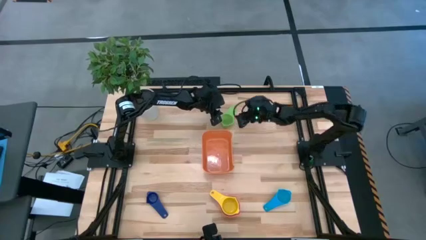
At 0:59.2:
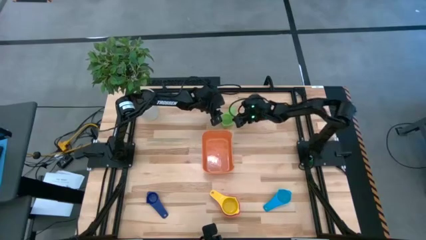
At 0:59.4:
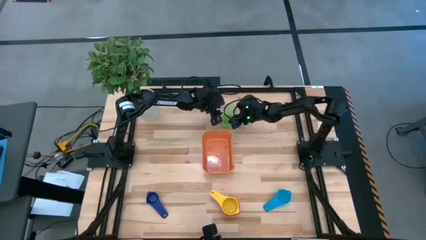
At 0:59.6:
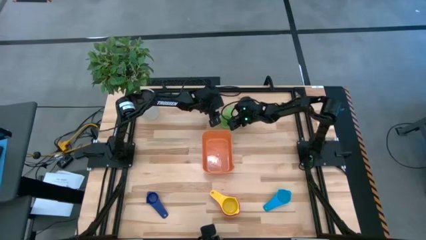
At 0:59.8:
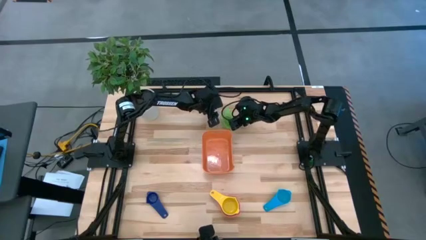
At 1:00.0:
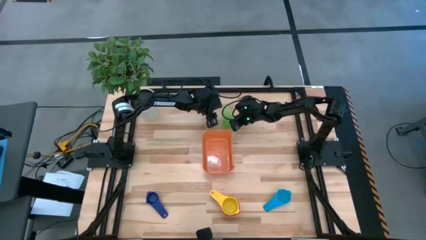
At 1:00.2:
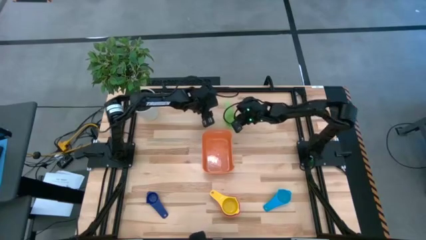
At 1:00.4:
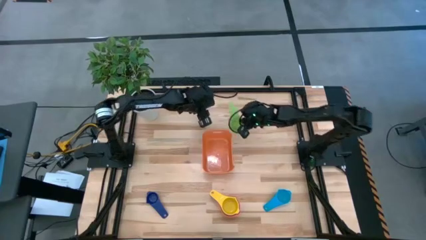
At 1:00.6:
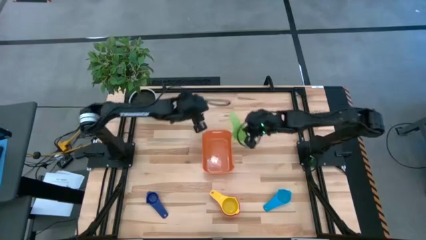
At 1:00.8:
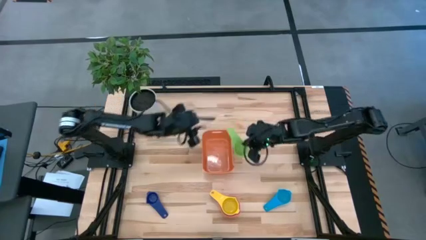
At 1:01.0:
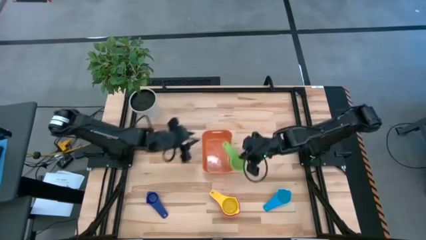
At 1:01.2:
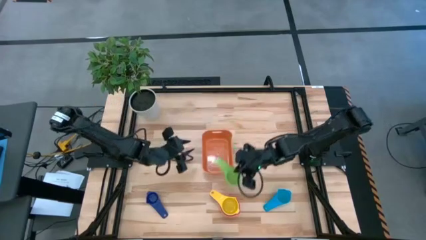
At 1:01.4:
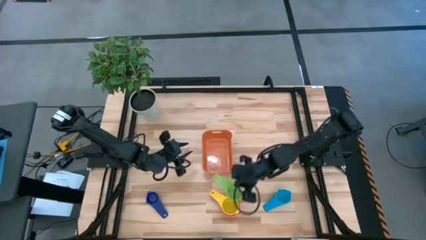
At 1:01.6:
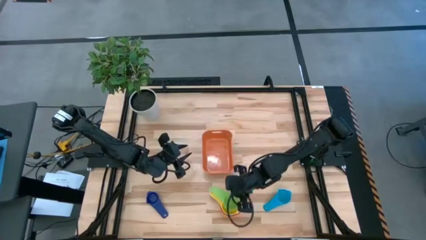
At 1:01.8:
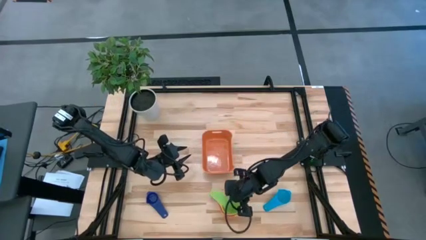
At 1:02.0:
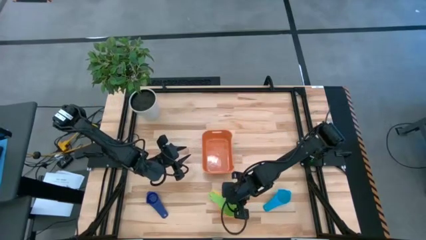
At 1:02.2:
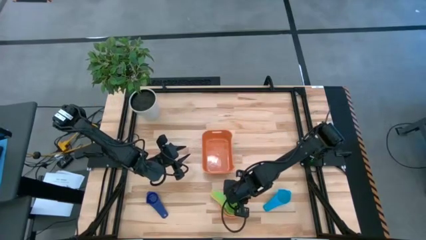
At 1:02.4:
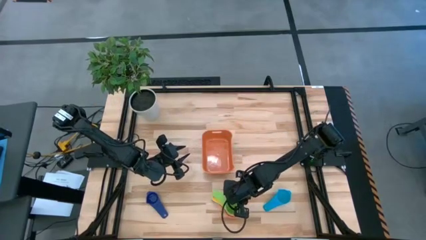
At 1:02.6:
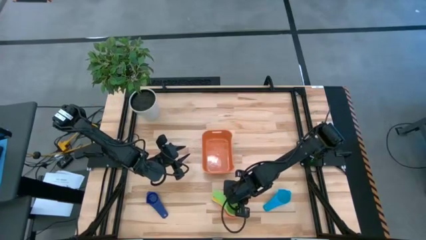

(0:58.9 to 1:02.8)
Task: Nest measuring cups in basket
Stack the green measuring cup on top of the yellow measuring cup

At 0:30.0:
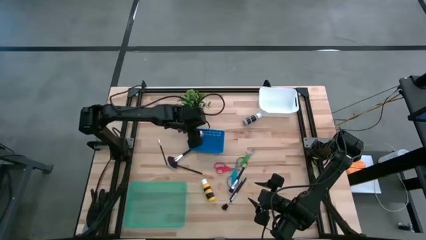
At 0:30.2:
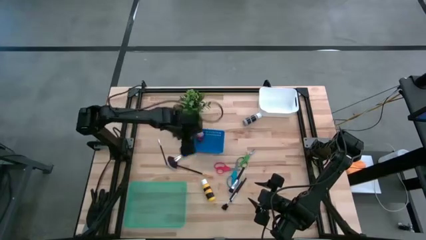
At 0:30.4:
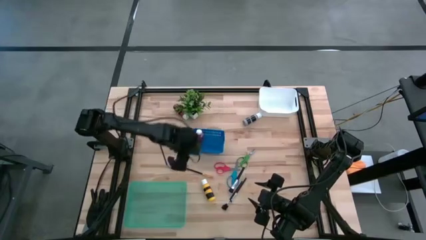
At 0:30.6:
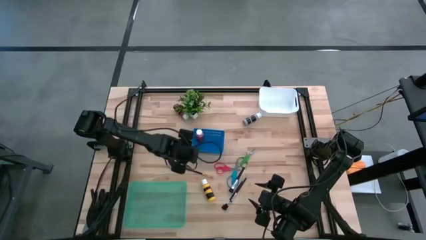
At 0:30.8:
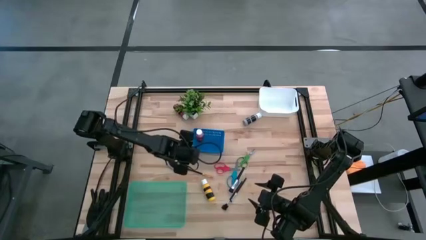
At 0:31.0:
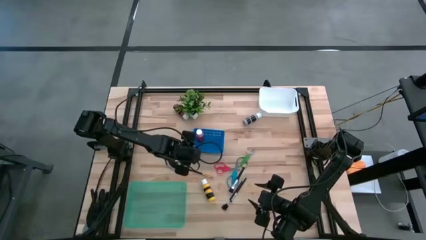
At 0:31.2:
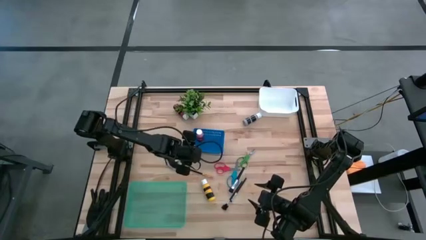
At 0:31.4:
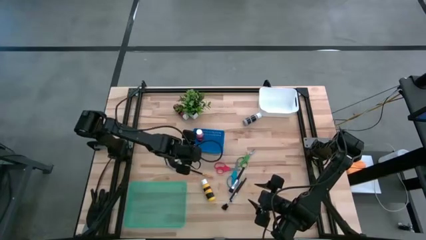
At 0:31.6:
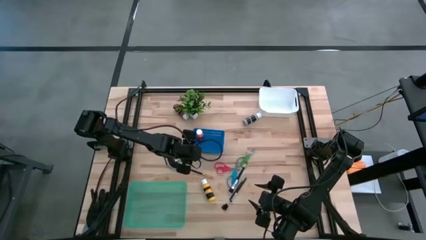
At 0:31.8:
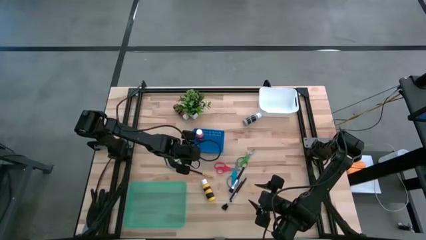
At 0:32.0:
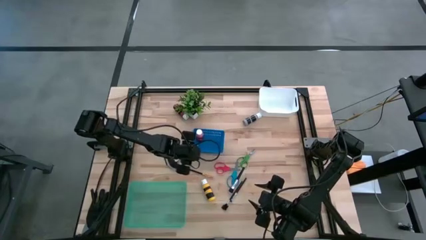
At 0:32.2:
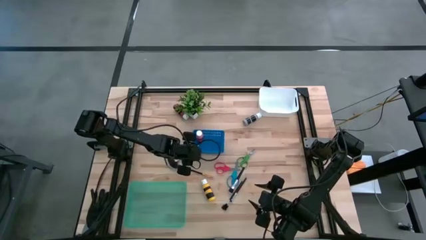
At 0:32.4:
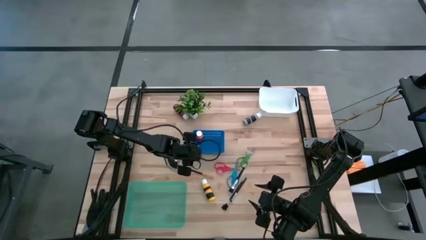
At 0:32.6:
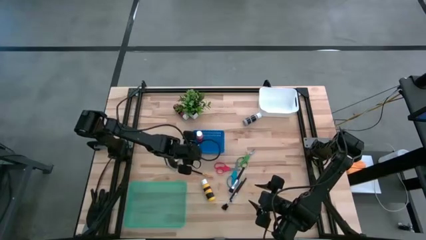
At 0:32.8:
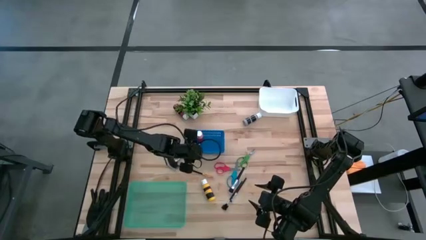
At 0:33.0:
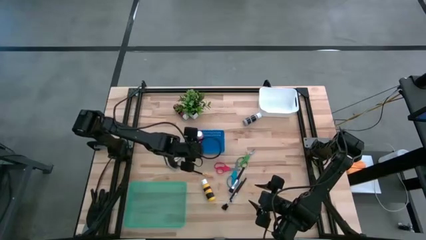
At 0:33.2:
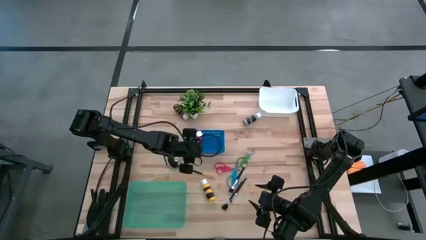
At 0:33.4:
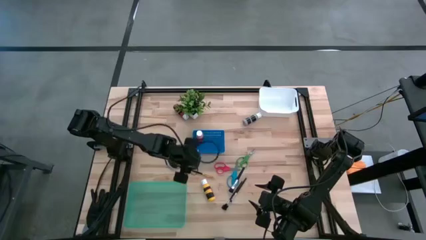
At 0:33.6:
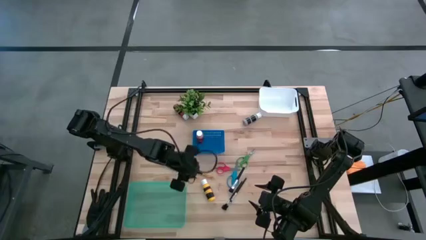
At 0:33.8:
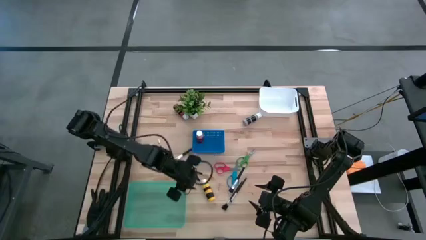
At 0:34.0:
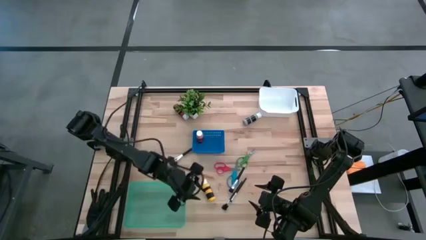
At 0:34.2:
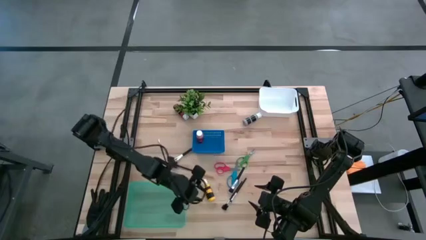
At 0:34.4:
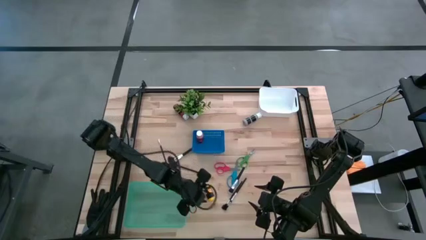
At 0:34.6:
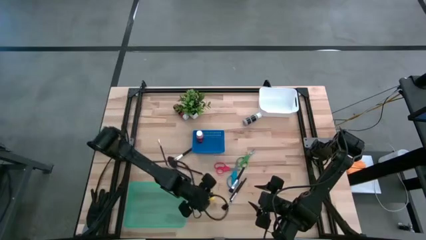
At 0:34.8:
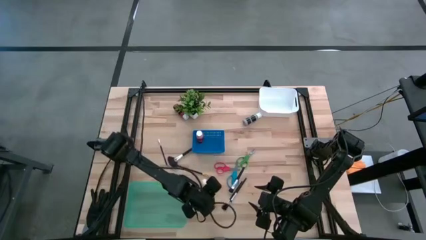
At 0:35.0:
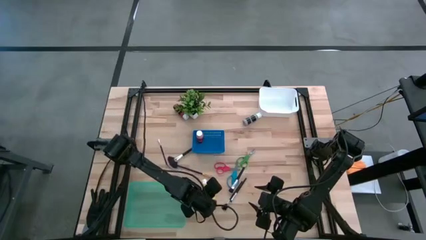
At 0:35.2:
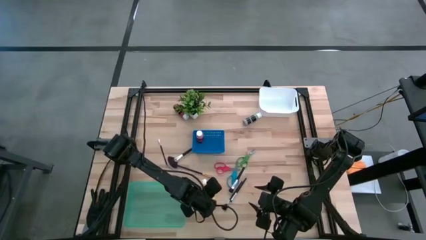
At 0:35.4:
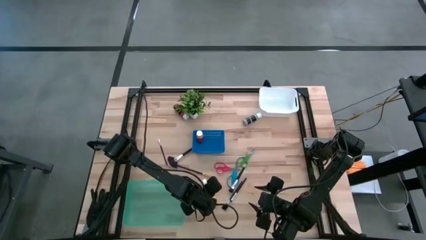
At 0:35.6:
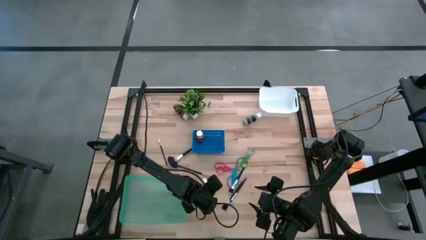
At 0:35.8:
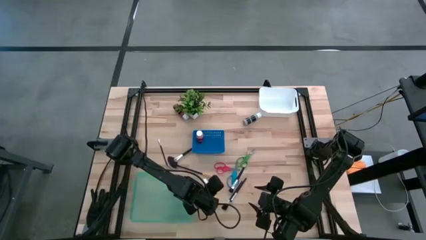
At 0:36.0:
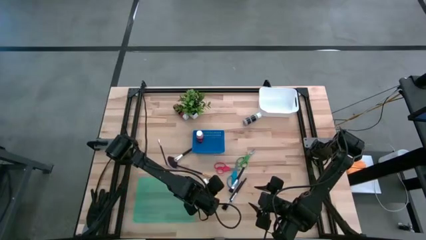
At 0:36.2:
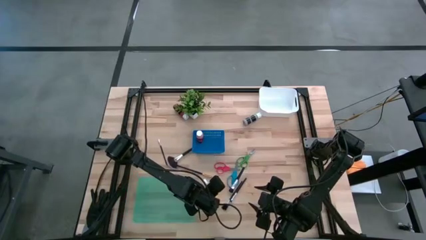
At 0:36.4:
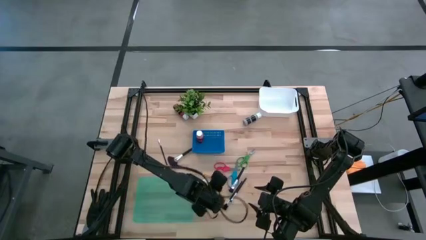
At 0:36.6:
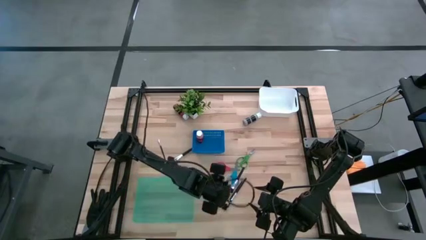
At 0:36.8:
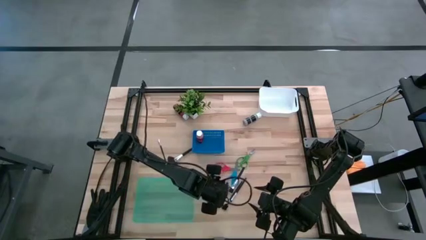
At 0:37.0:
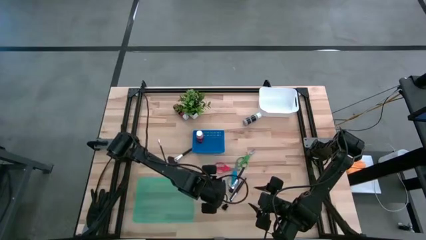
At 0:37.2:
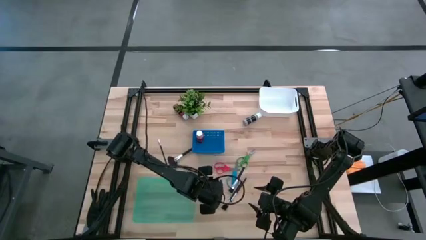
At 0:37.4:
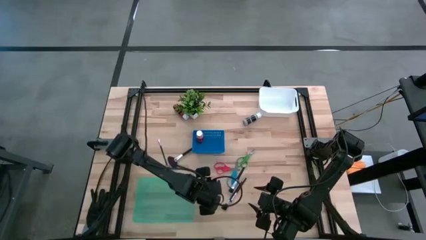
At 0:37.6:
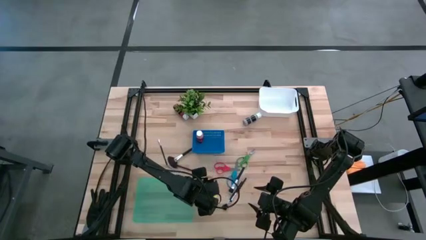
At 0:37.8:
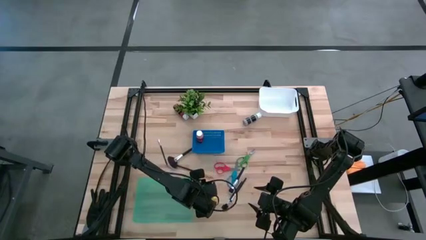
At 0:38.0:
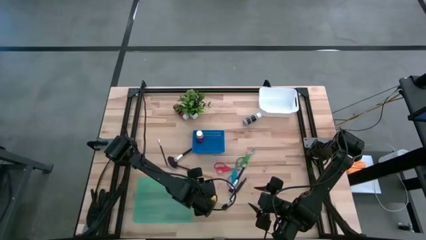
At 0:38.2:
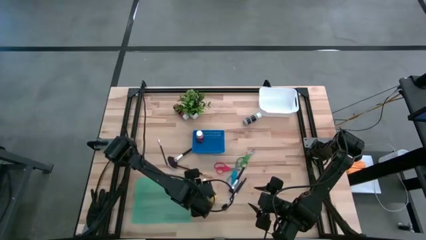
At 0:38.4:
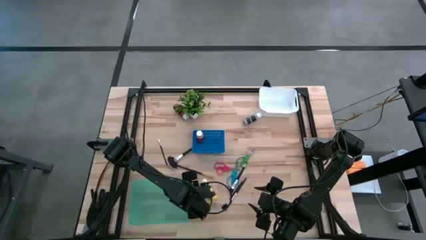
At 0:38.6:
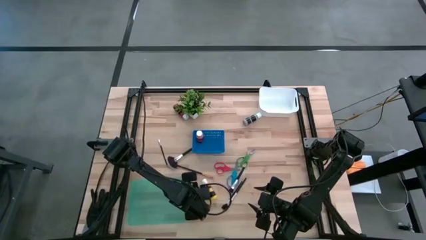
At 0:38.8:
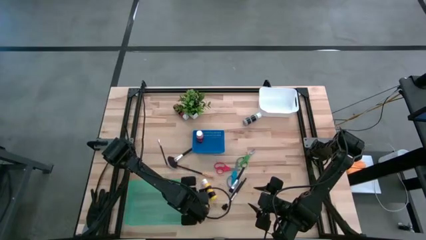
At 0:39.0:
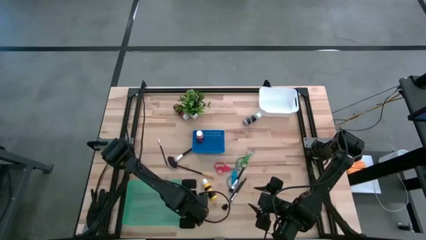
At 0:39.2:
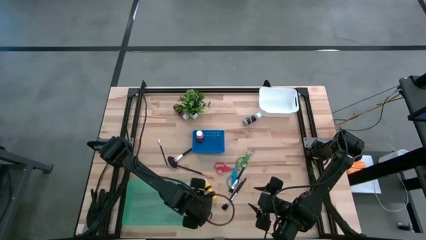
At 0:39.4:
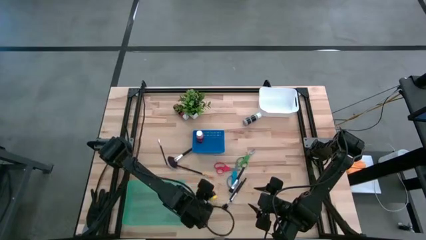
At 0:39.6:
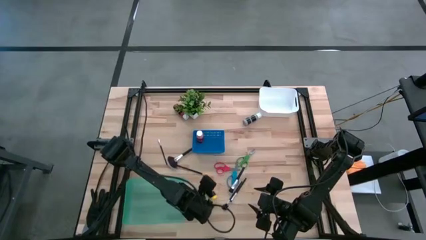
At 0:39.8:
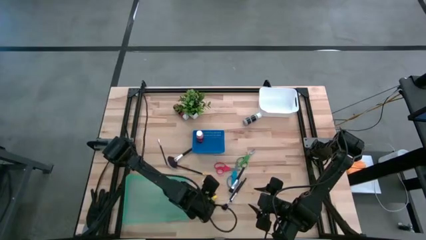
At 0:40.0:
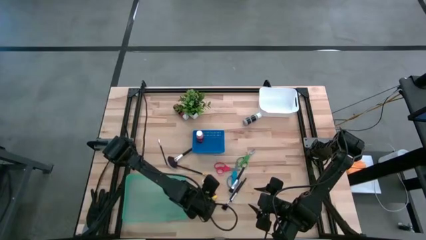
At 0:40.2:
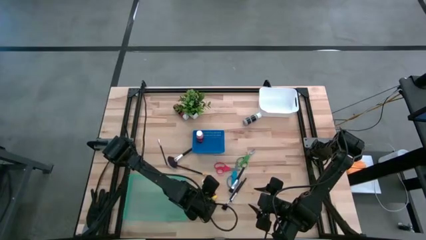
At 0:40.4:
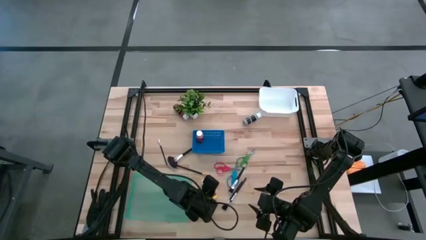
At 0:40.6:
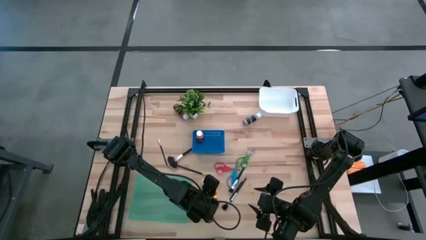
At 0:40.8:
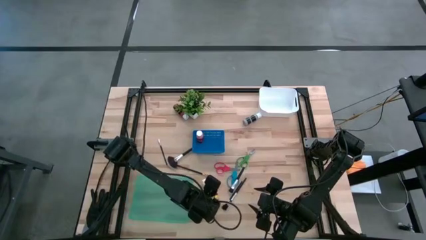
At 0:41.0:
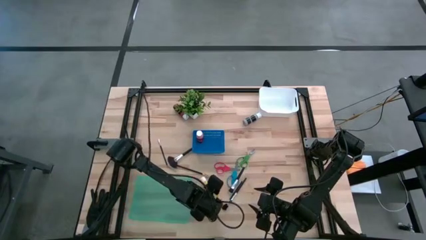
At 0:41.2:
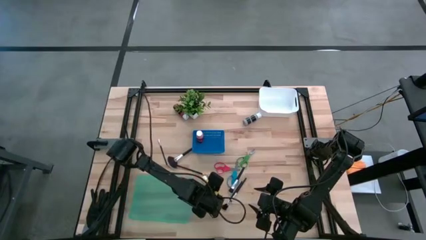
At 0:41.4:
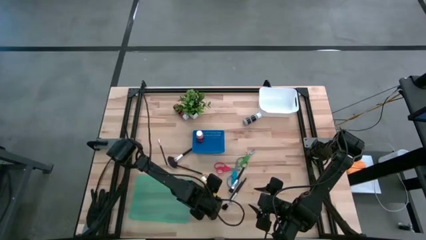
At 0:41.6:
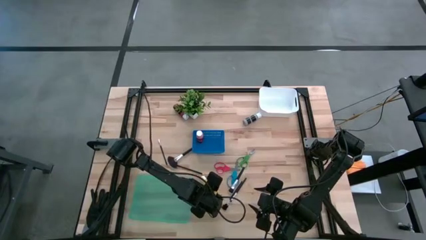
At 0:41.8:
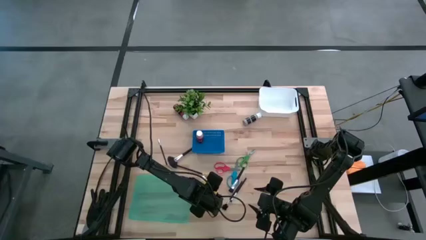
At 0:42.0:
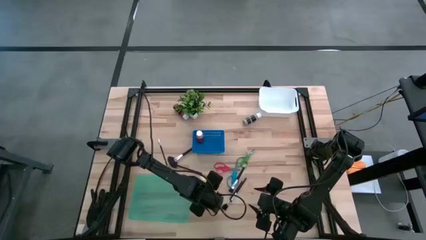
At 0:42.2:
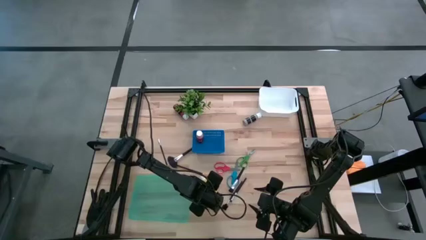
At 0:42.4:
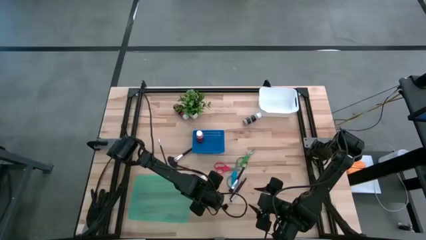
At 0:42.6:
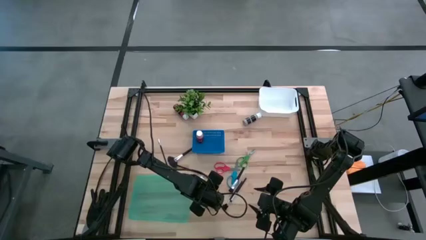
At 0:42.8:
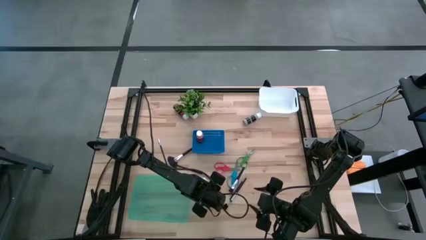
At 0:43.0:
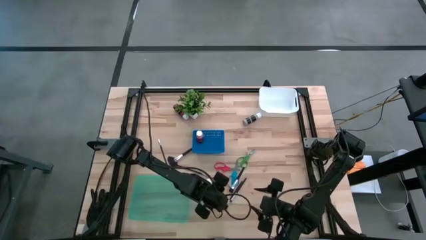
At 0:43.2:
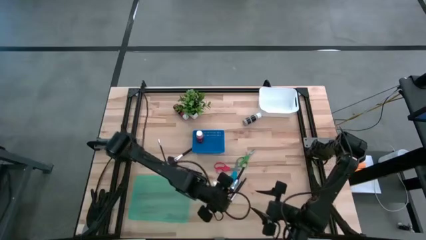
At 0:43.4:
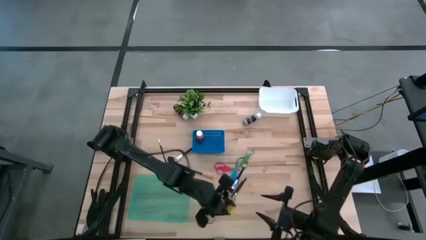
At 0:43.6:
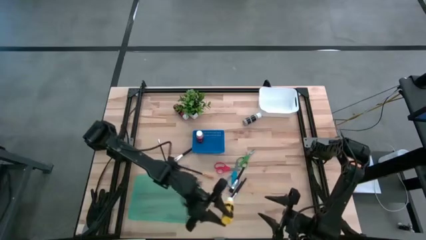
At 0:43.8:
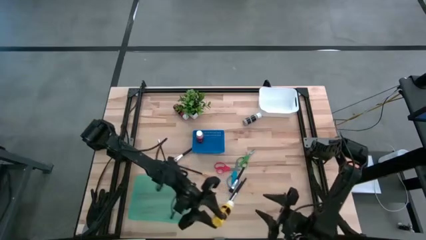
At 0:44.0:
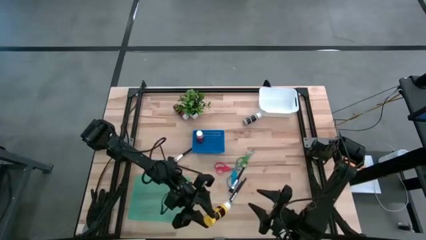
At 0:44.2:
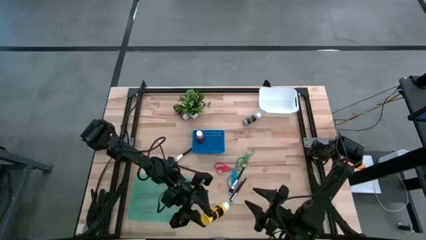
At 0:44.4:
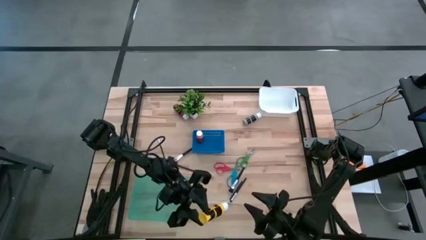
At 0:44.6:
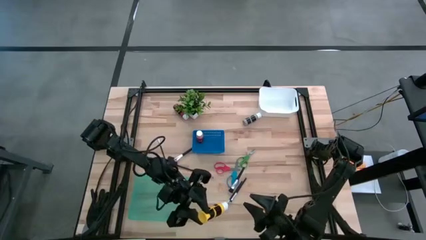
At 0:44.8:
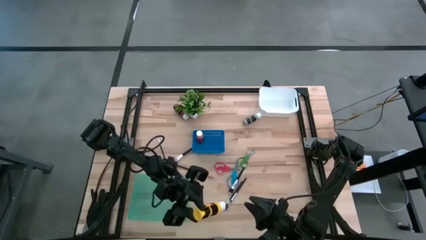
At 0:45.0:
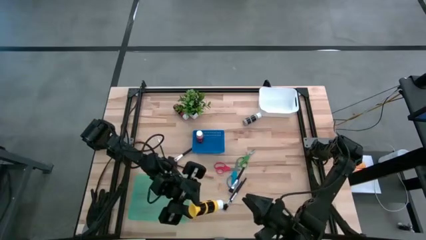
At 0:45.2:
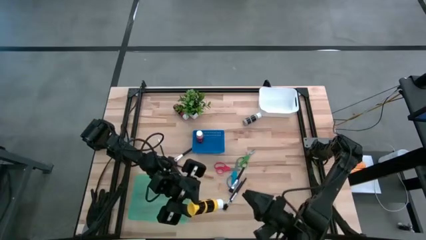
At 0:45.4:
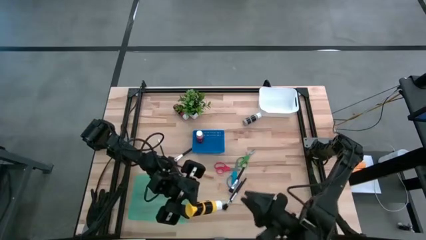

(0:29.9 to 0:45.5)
Task: Pick & Place Paint Supplies
Put the yellow paint into the blue bin
